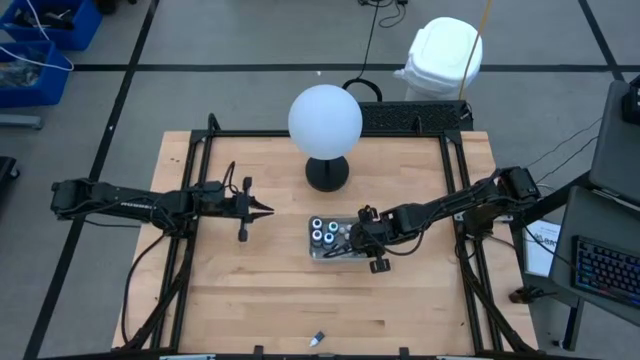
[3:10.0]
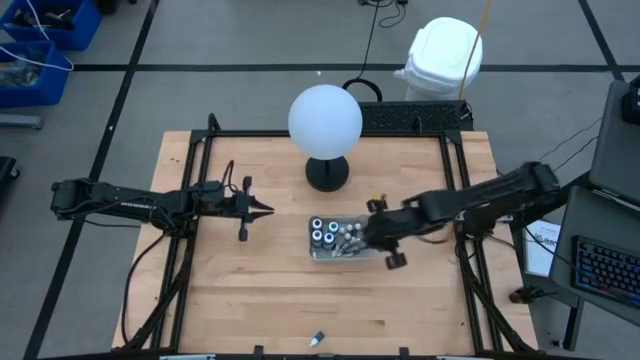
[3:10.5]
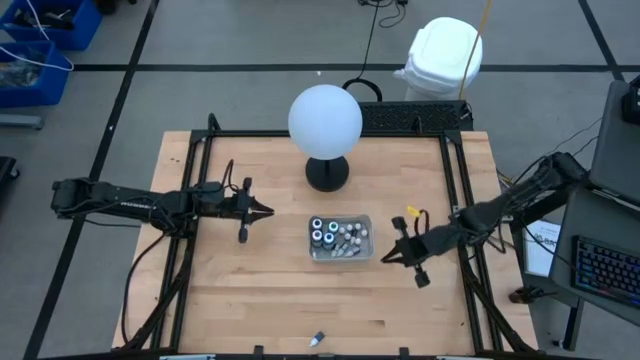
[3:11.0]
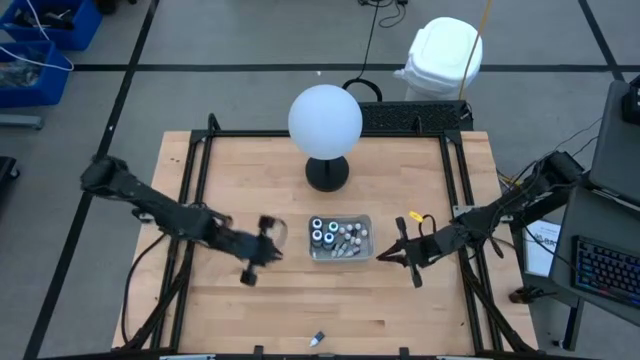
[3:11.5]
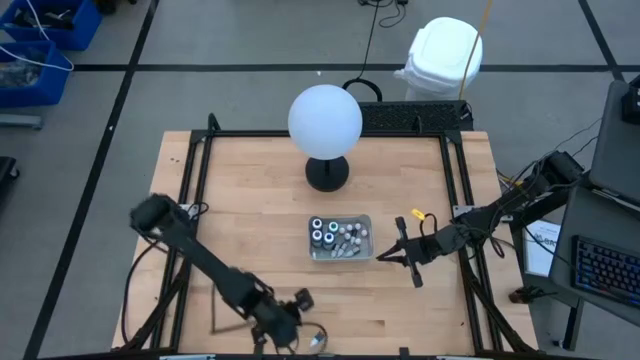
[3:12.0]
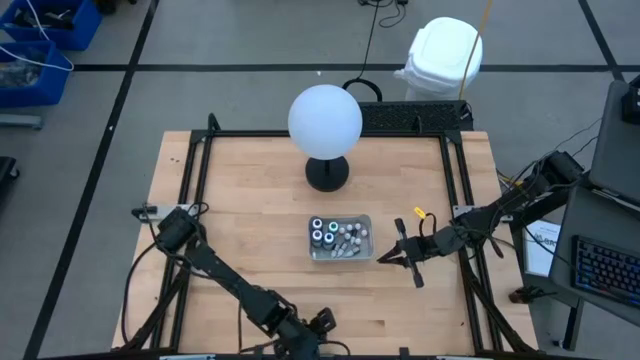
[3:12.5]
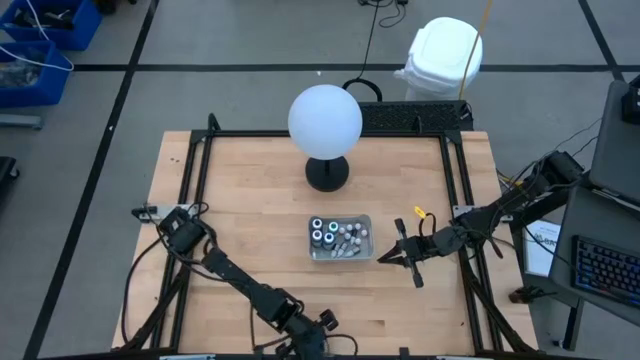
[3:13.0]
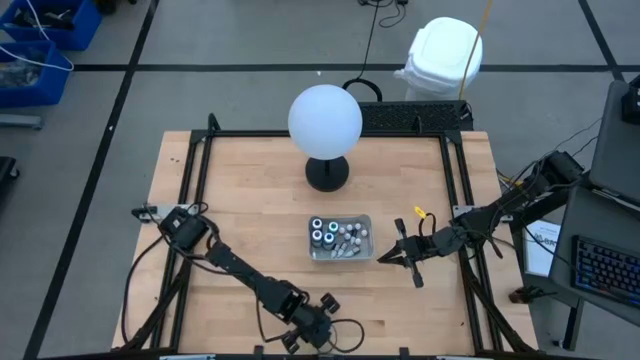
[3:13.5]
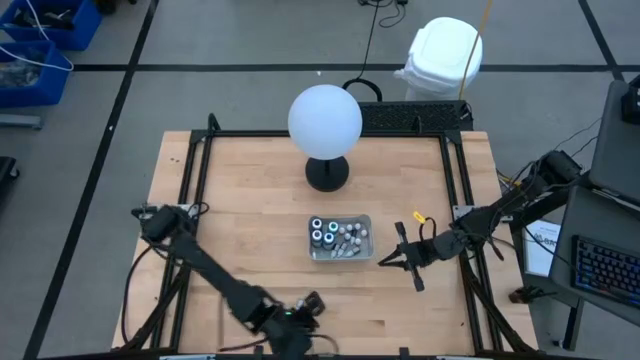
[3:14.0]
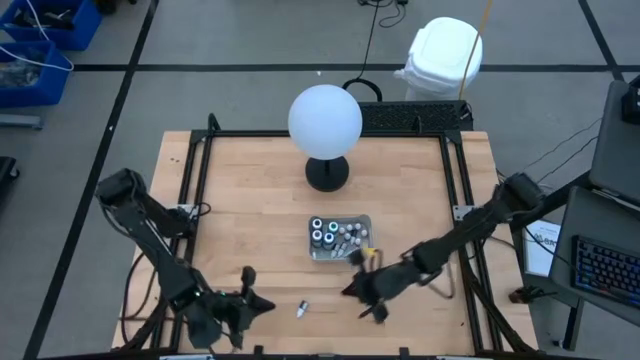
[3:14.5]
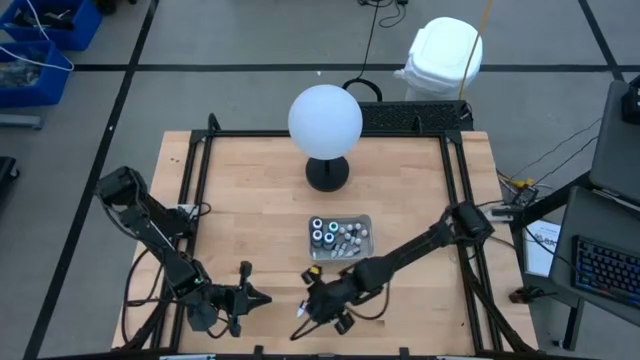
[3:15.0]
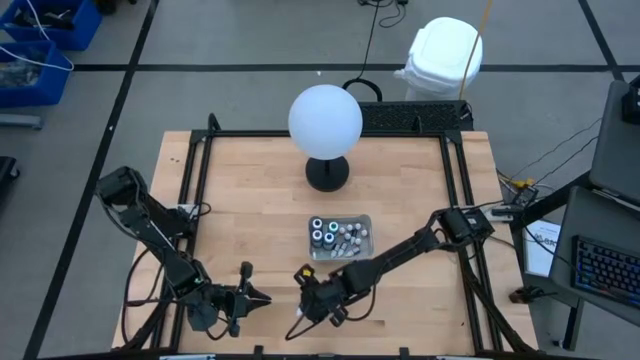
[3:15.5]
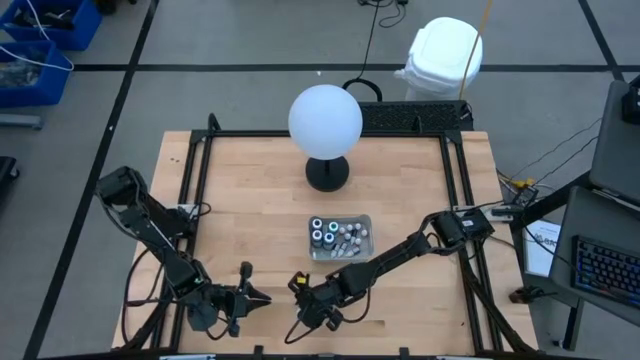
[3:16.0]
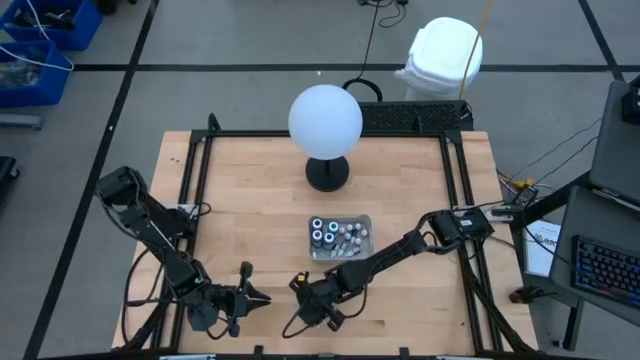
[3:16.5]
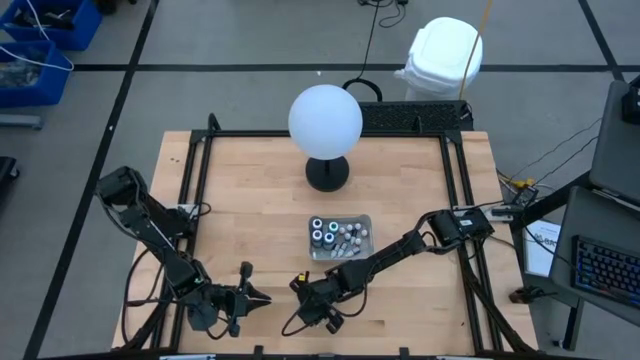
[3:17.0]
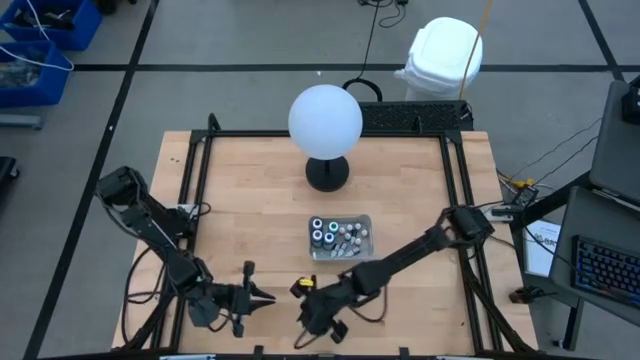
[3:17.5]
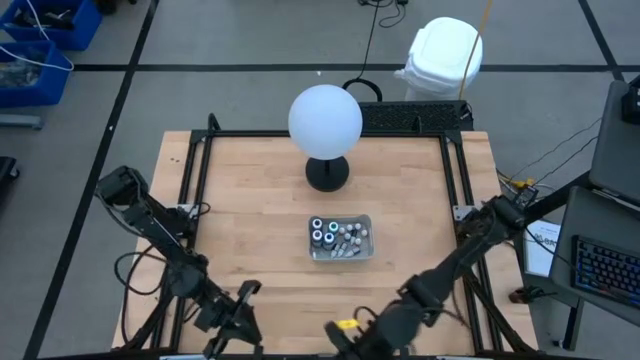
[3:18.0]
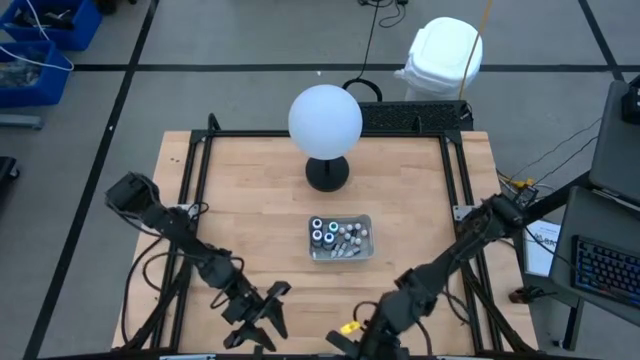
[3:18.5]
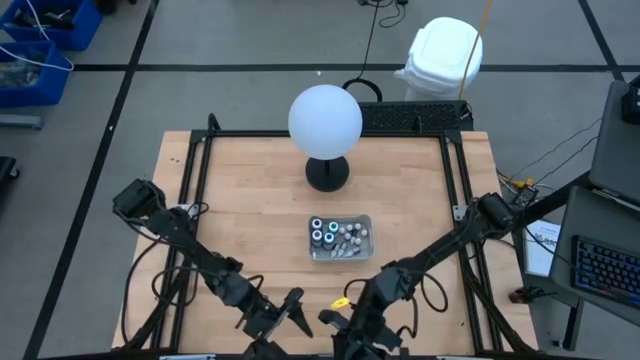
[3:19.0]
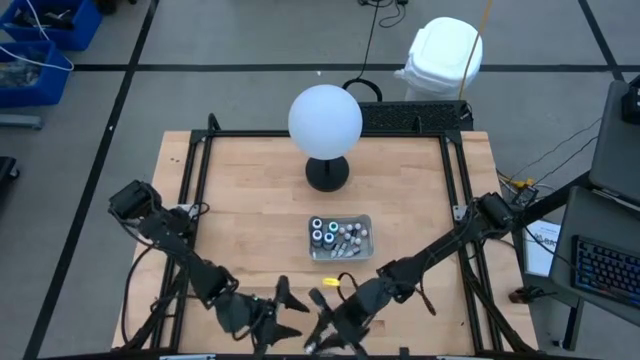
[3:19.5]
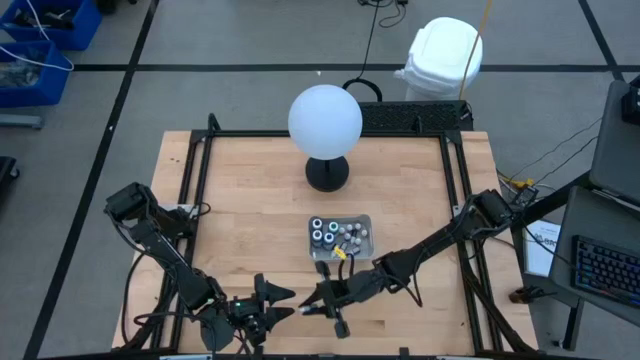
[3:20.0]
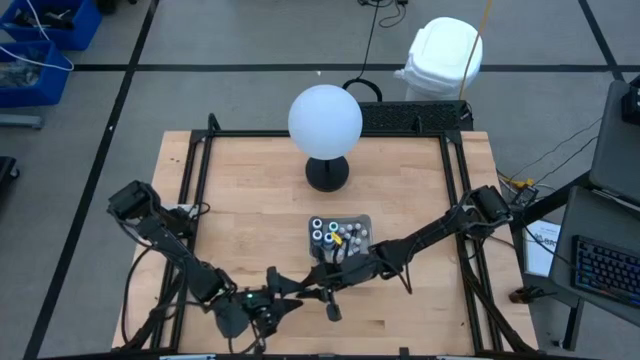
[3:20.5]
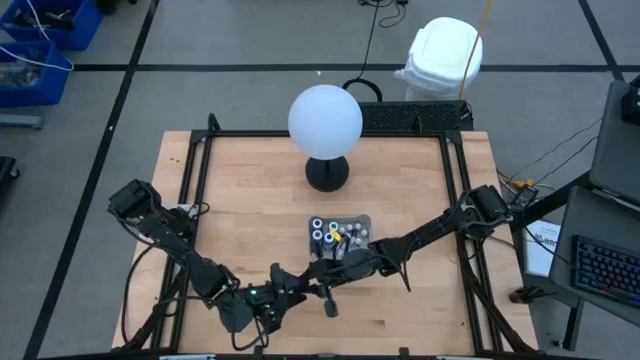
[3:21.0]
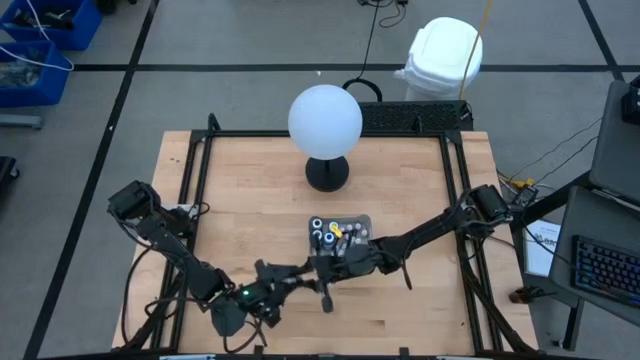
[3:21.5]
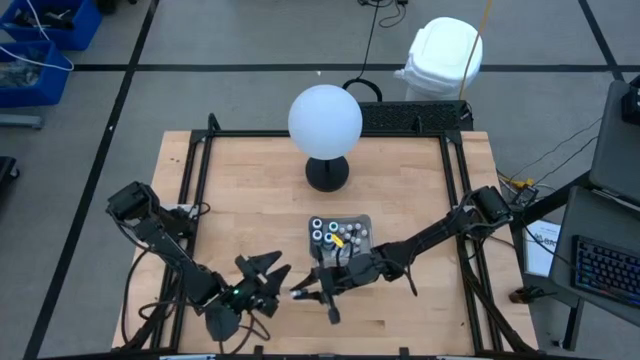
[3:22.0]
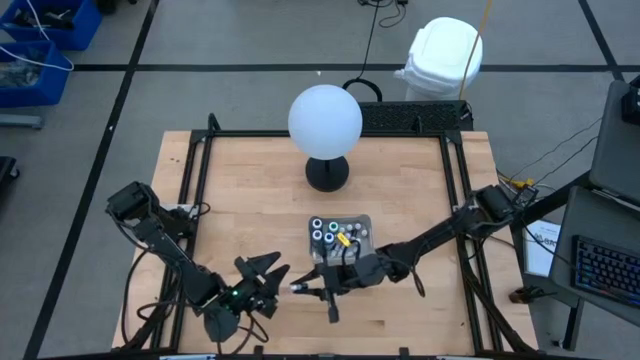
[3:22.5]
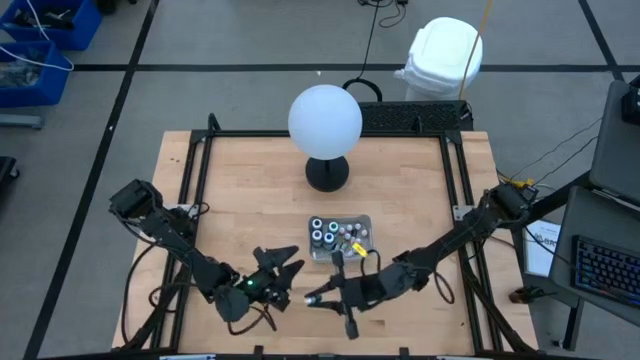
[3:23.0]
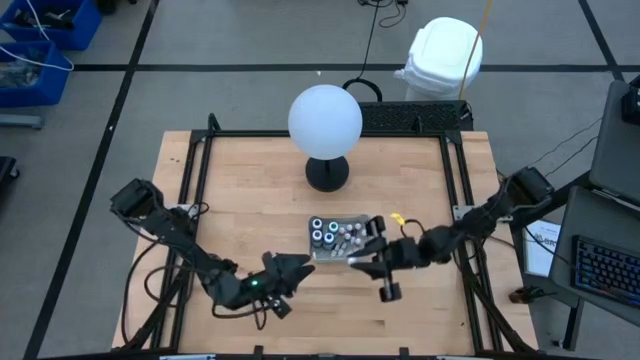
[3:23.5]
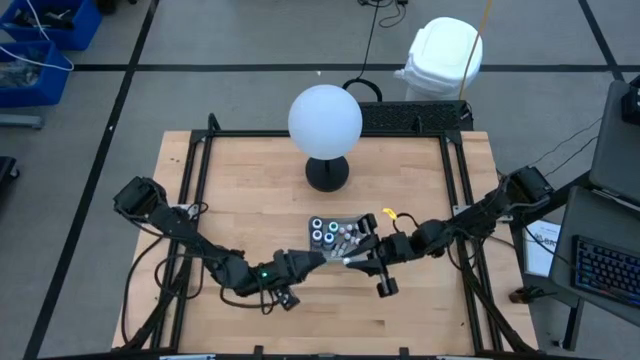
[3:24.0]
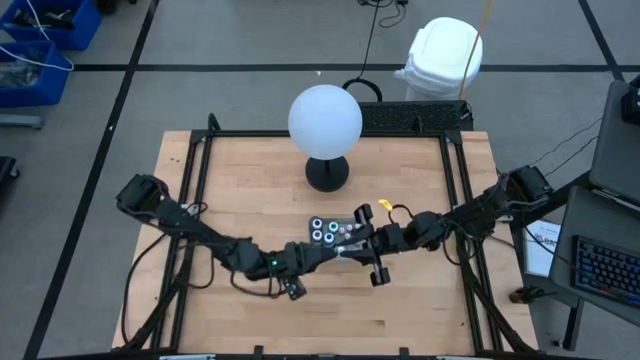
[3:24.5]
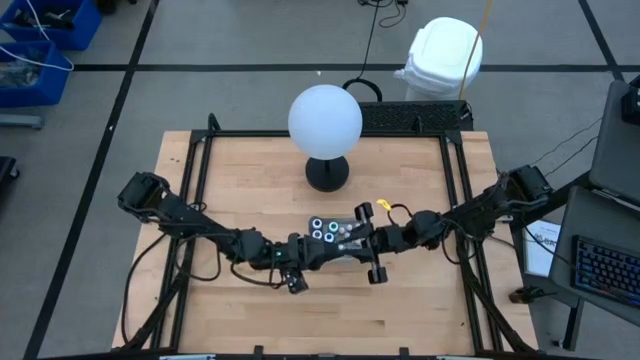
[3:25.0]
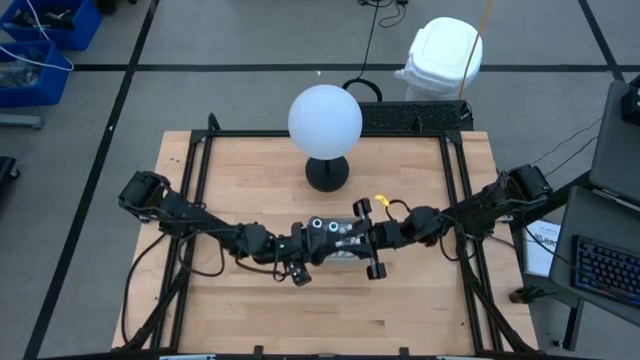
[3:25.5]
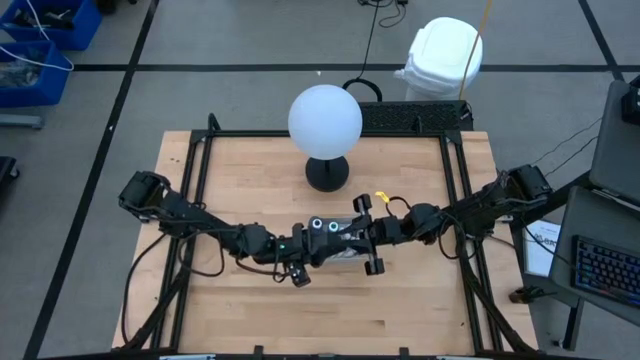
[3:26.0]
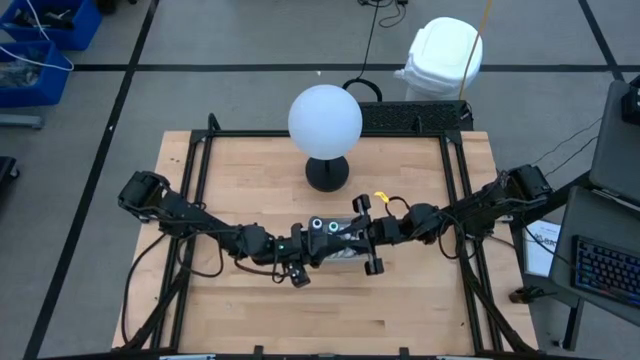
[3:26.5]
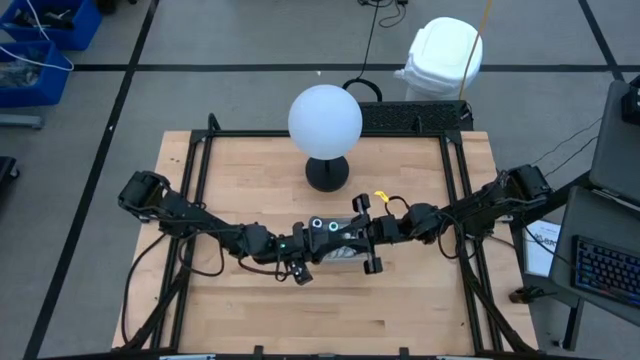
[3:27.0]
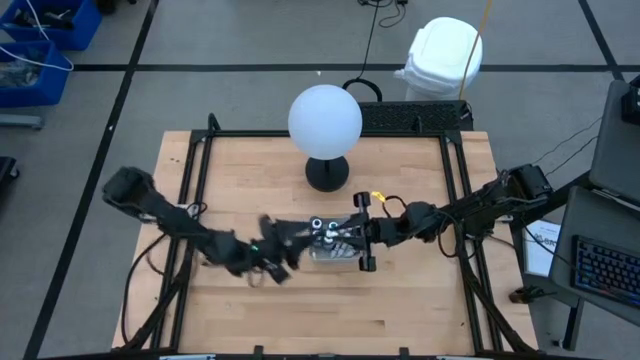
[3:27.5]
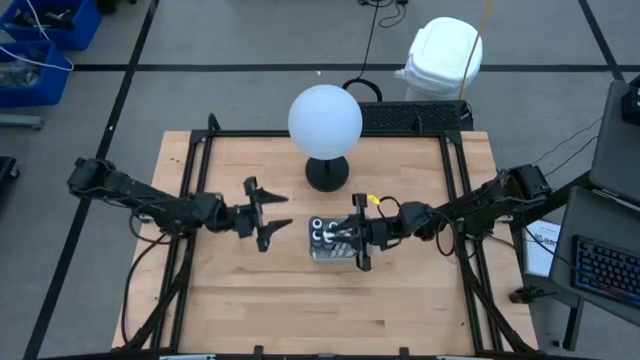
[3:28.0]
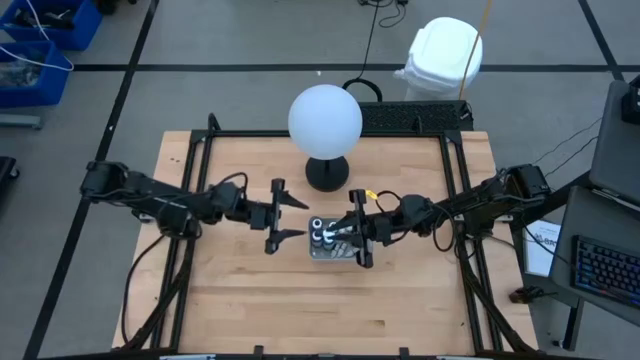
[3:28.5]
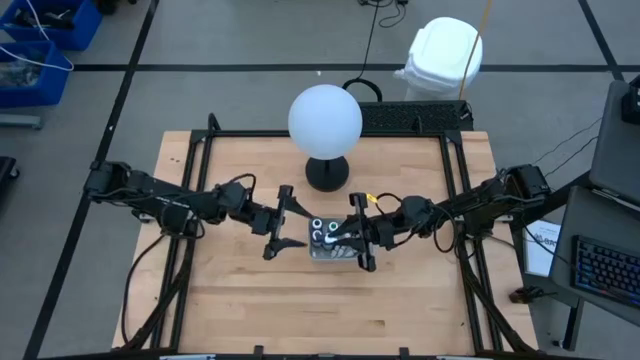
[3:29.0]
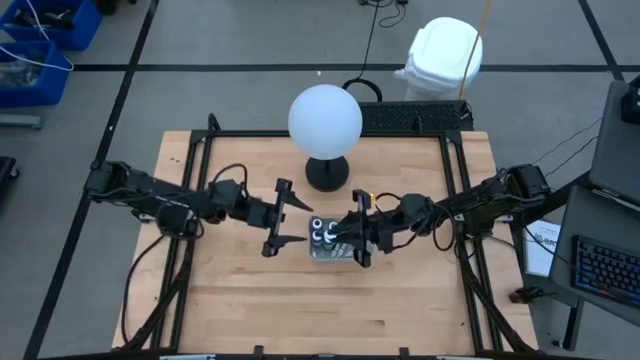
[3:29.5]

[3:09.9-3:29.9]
Task: Pick & Place food coloring
Put the small blue food coloring bottle into the gray bin
